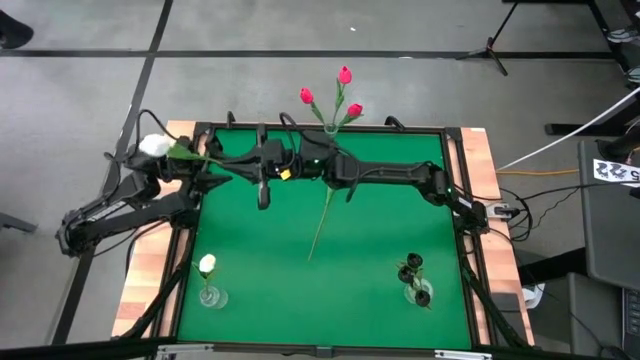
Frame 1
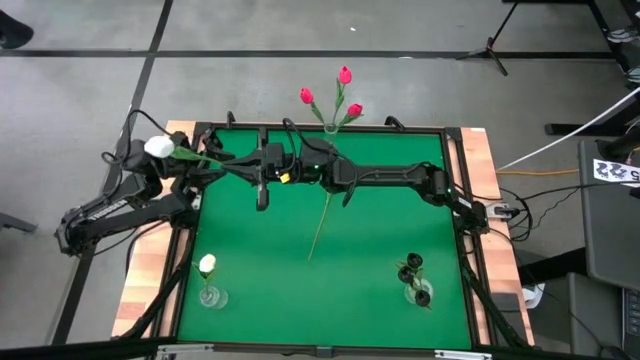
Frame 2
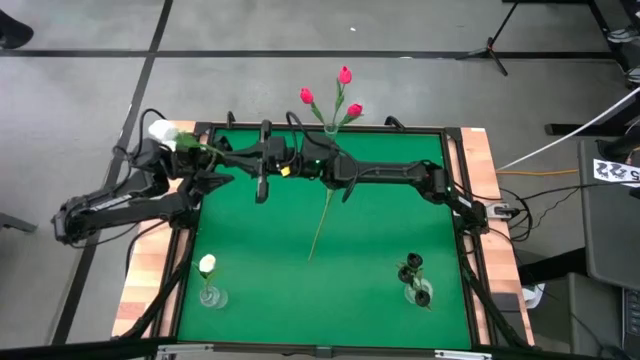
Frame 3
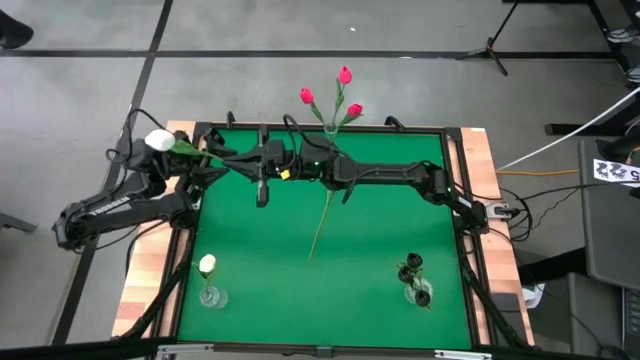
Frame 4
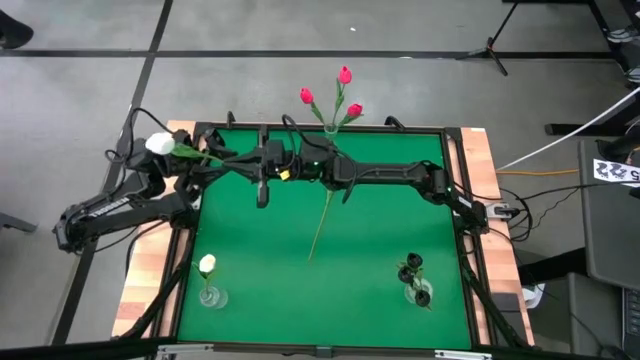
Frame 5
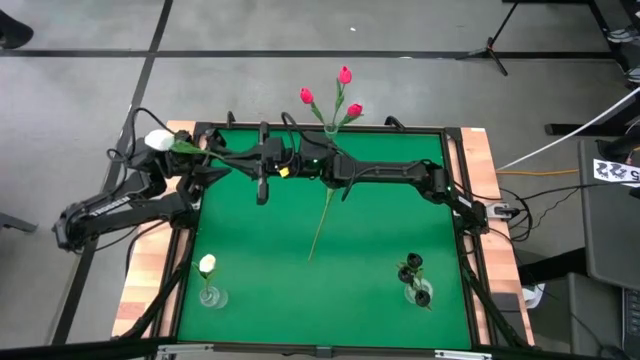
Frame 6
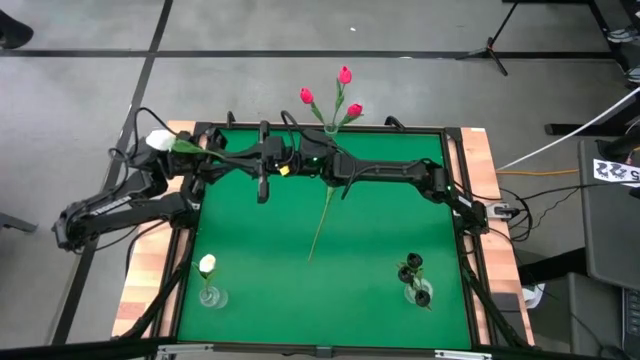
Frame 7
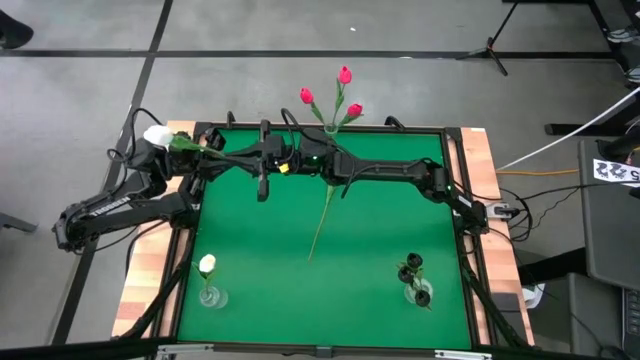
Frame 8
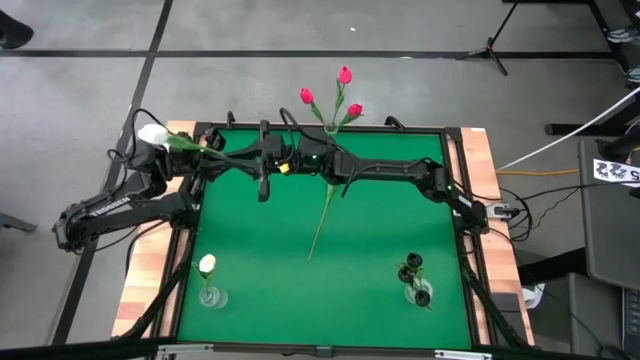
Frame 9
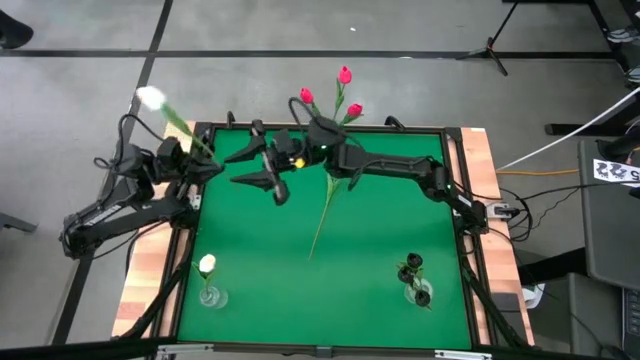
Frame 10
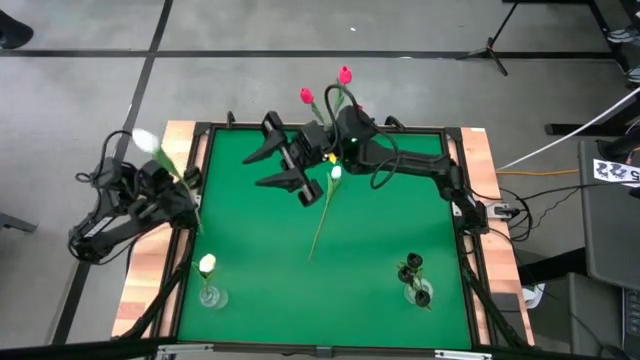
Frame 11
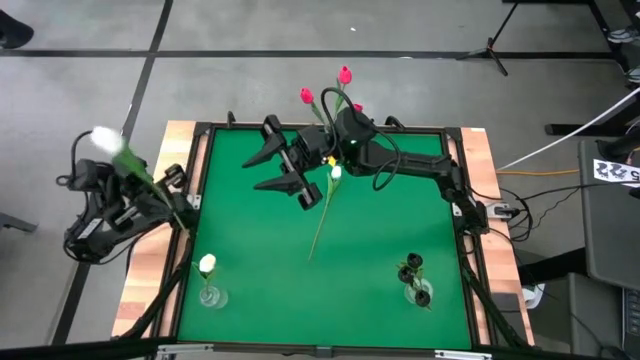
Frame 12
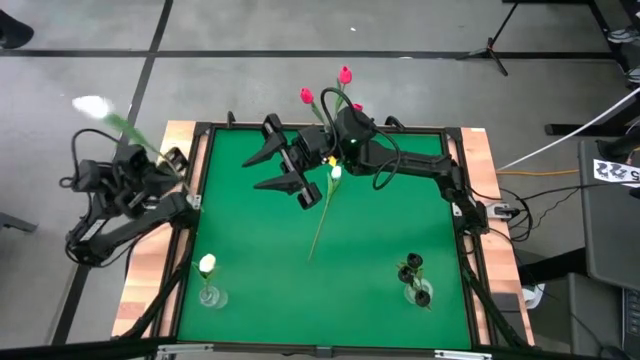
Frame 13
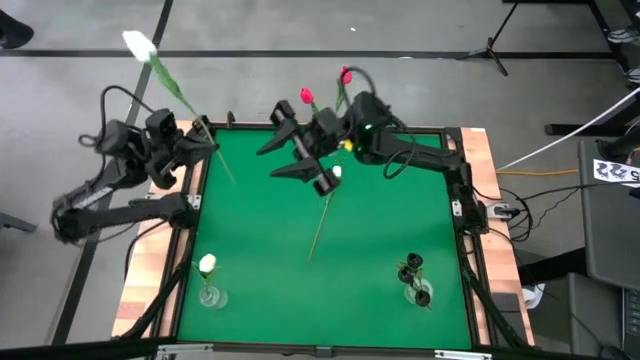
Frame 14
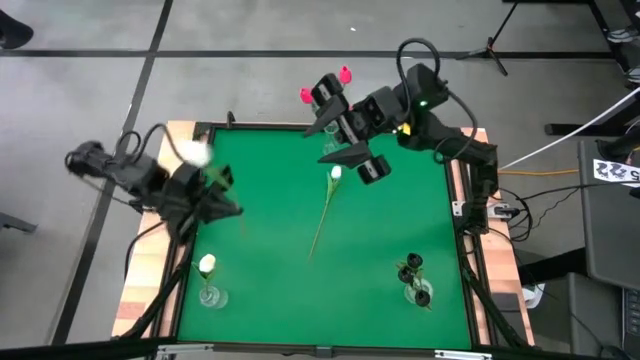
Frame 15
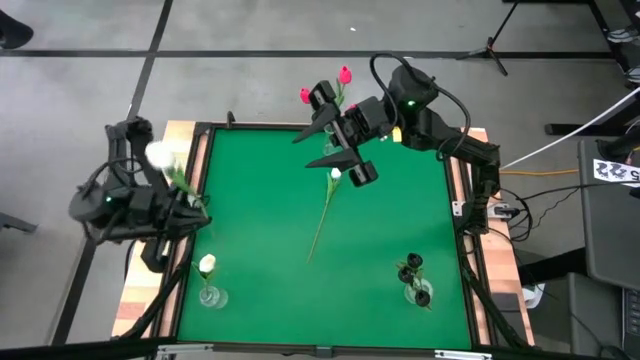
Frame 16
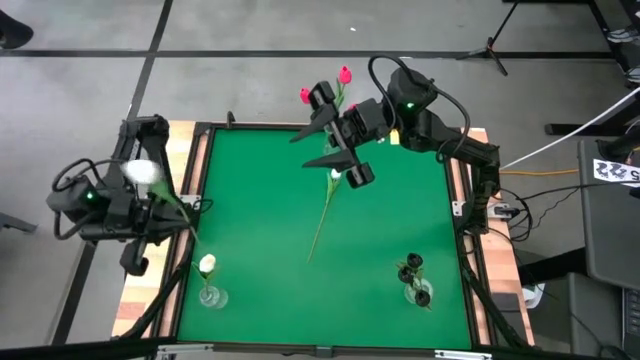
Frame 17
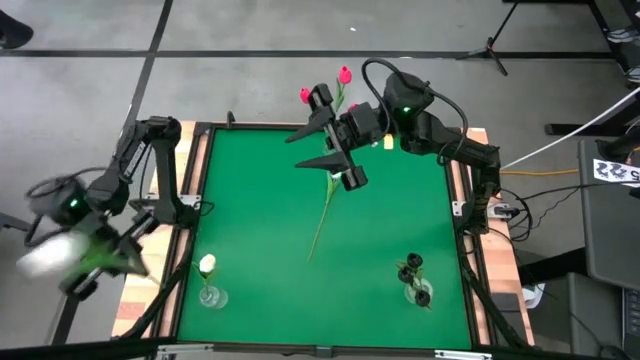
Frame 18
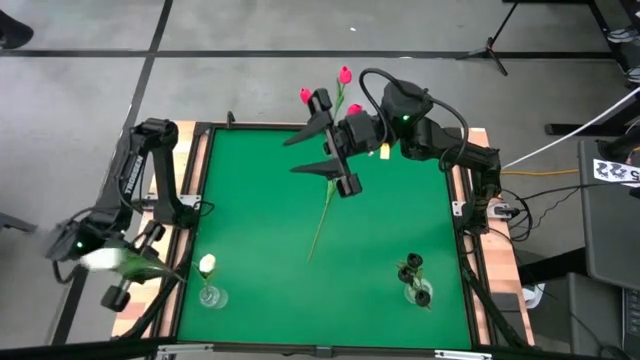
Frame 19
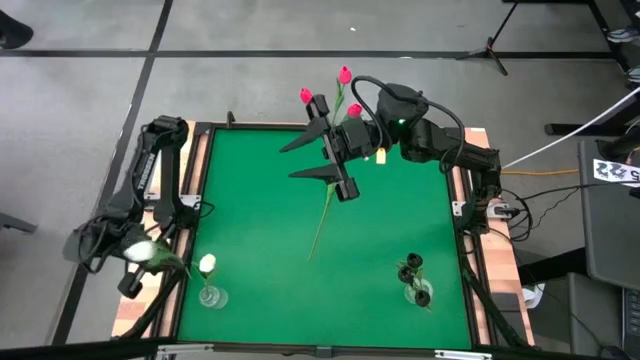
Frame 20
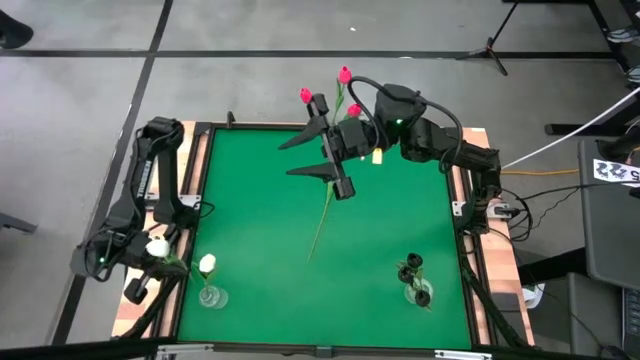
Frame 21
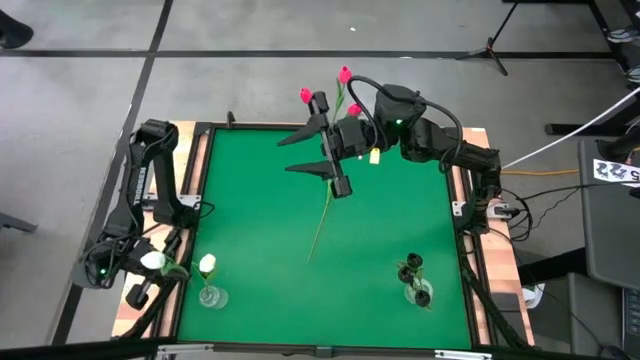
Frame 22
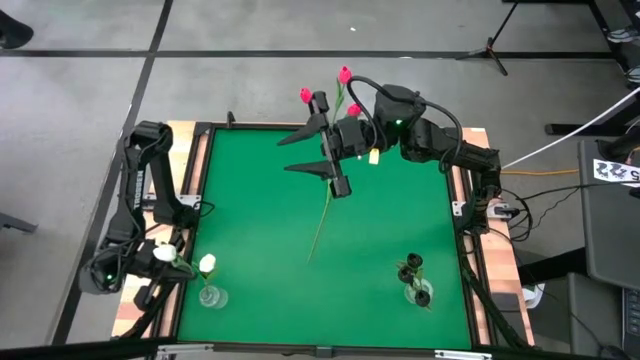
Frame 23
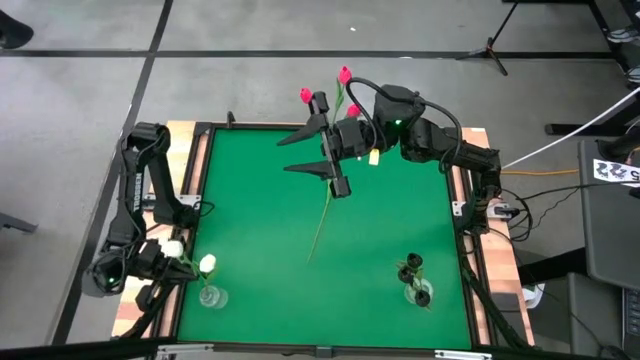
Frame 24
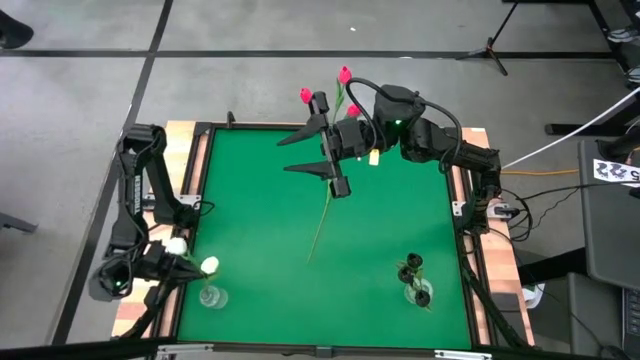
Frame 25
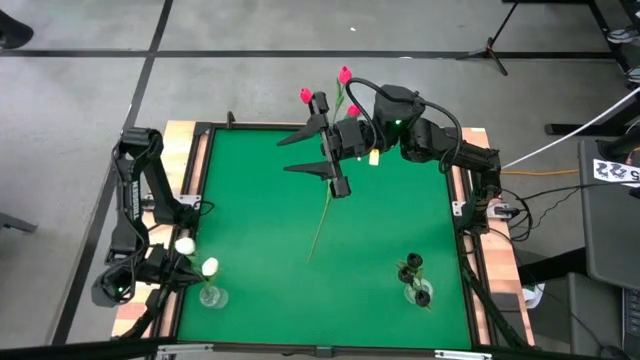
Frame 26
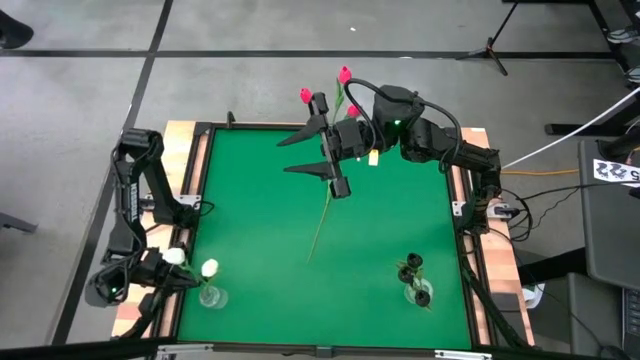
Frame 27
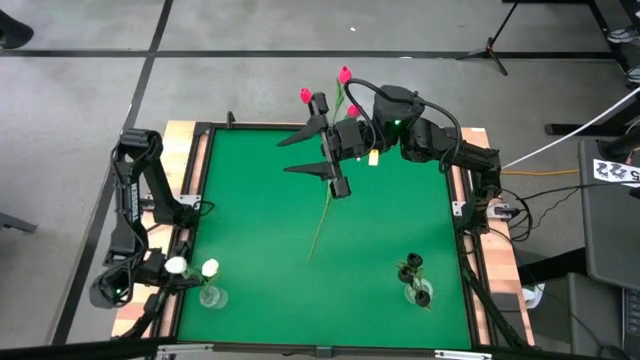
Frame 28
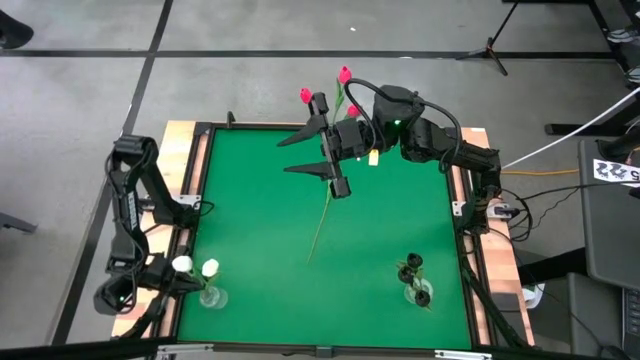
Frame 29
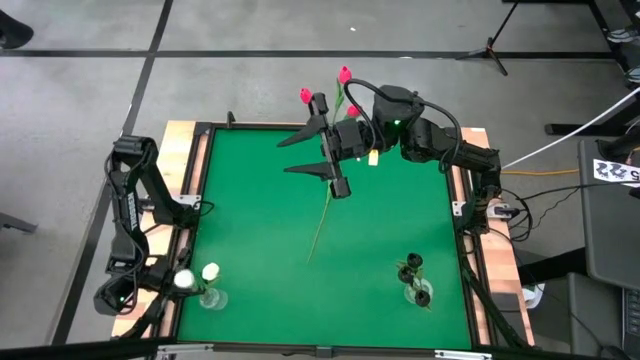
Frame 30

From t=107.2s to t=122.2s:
Task: Sort flowers into vase by color
Put the bottom white tulip into the bottom left transparent vase
